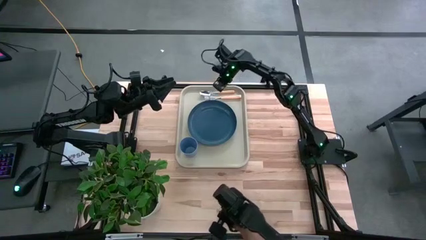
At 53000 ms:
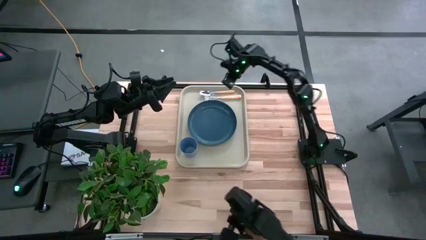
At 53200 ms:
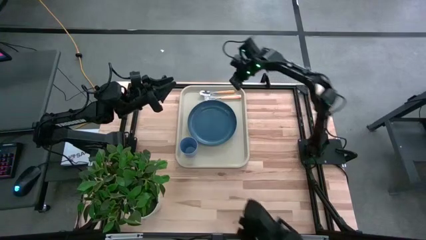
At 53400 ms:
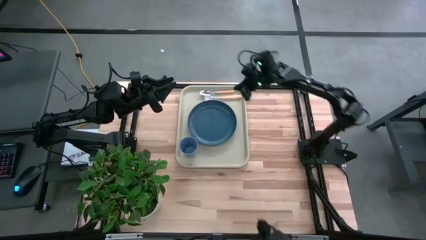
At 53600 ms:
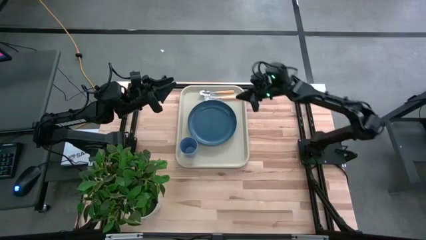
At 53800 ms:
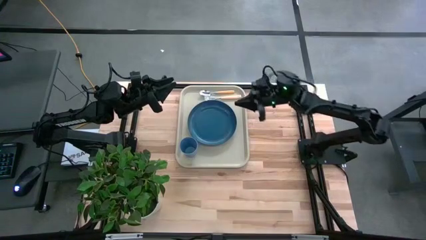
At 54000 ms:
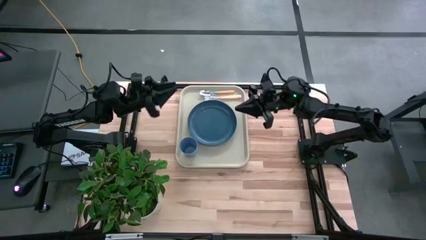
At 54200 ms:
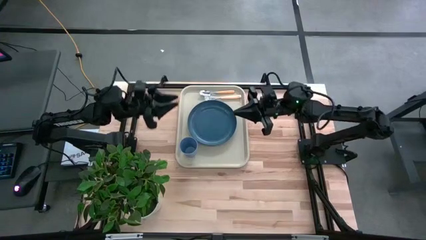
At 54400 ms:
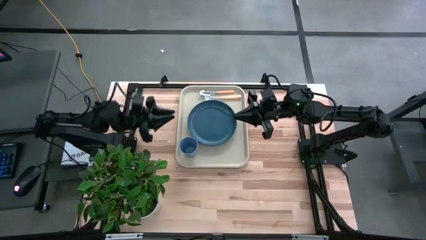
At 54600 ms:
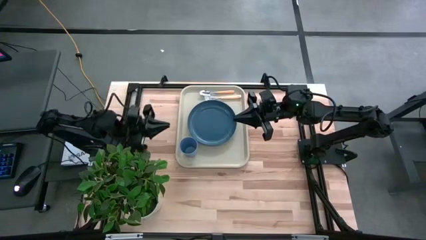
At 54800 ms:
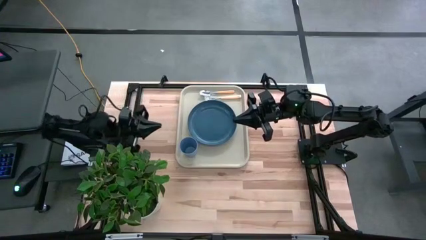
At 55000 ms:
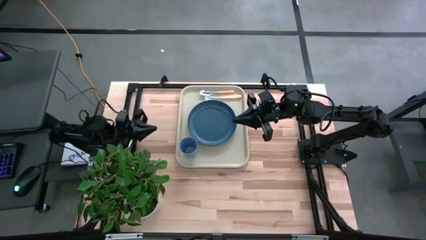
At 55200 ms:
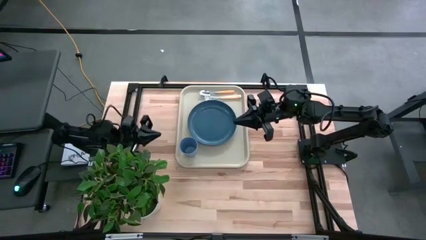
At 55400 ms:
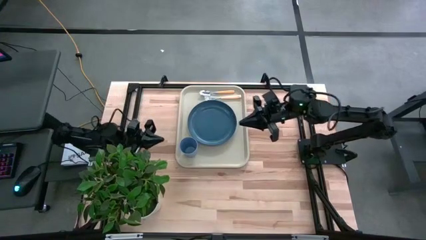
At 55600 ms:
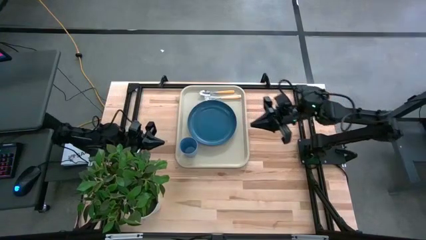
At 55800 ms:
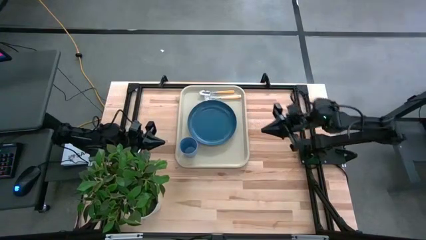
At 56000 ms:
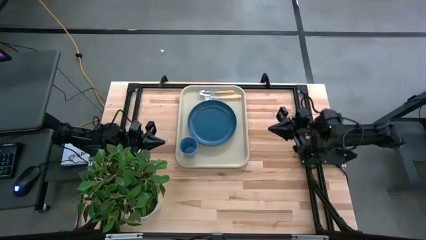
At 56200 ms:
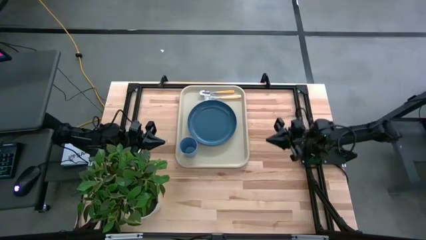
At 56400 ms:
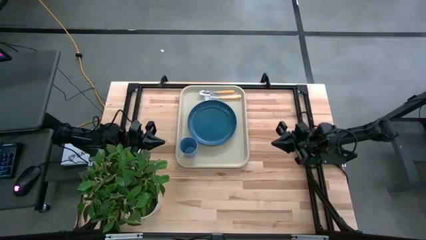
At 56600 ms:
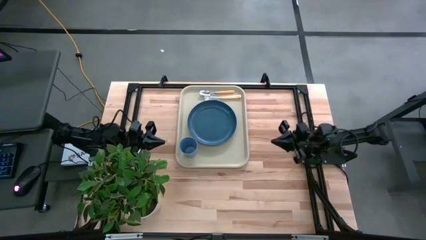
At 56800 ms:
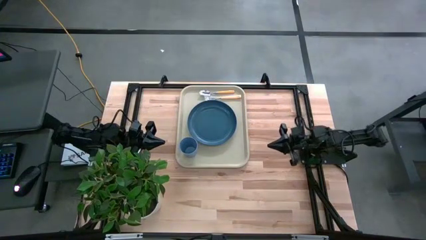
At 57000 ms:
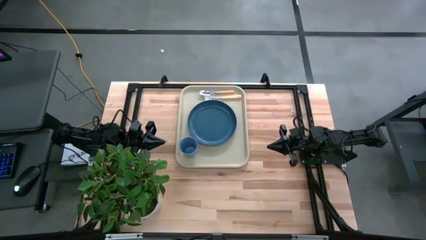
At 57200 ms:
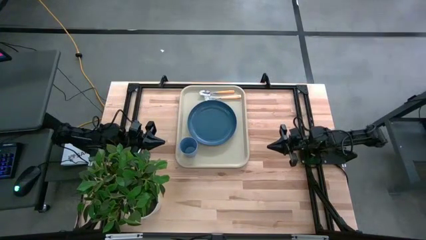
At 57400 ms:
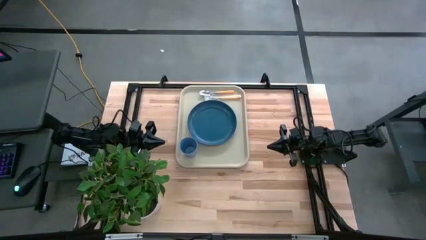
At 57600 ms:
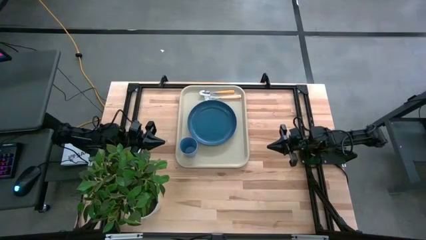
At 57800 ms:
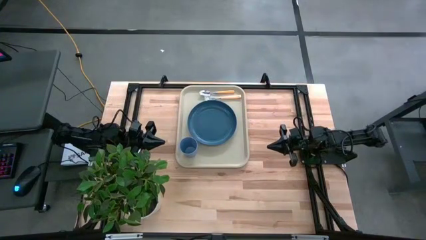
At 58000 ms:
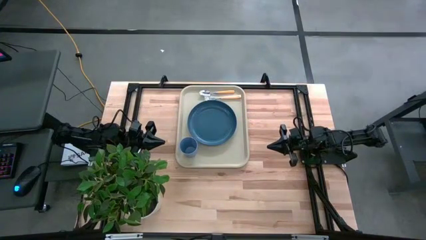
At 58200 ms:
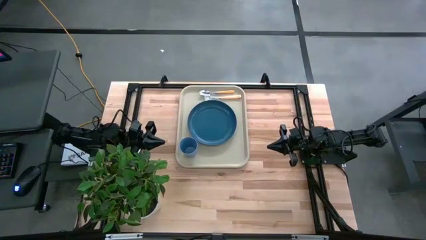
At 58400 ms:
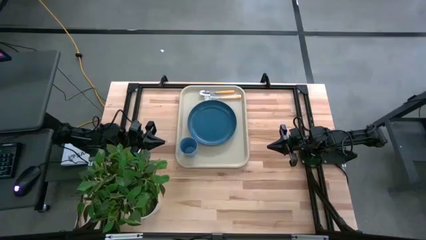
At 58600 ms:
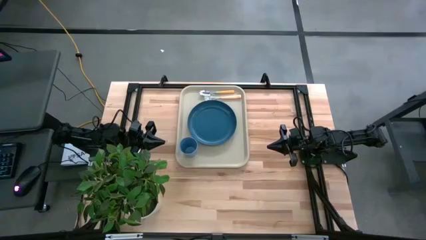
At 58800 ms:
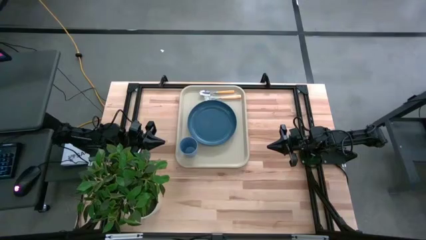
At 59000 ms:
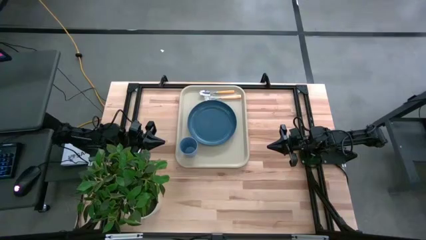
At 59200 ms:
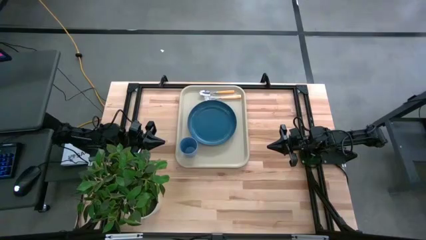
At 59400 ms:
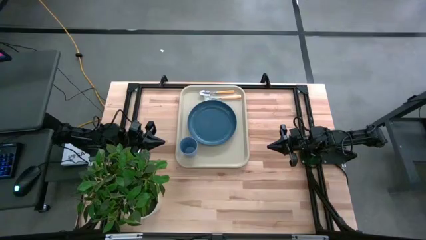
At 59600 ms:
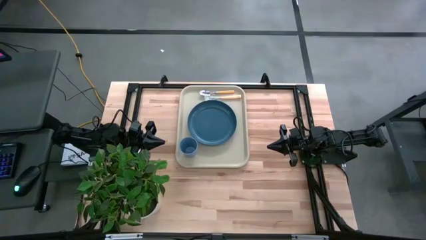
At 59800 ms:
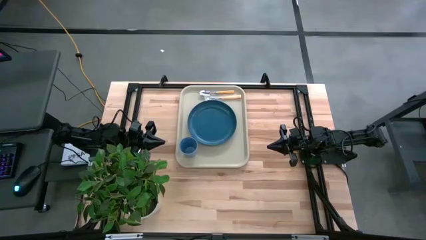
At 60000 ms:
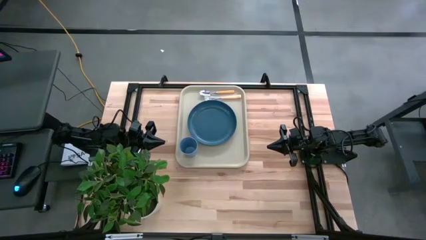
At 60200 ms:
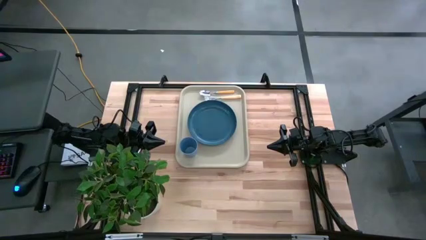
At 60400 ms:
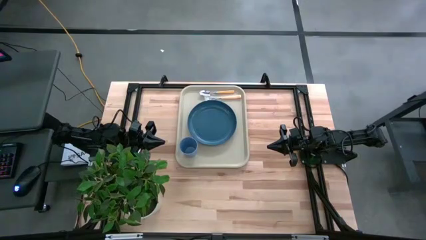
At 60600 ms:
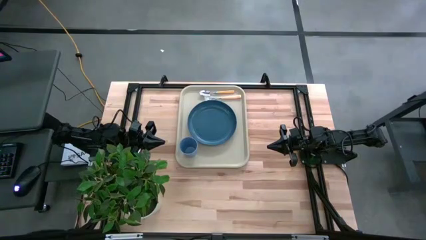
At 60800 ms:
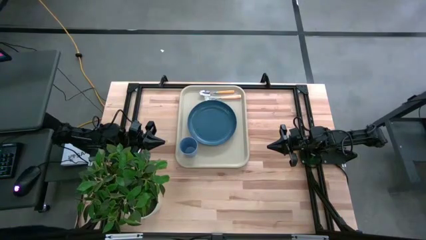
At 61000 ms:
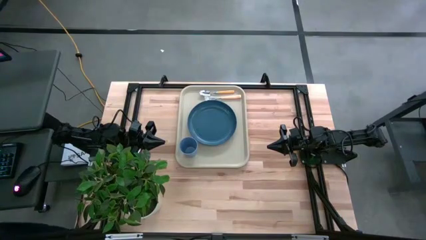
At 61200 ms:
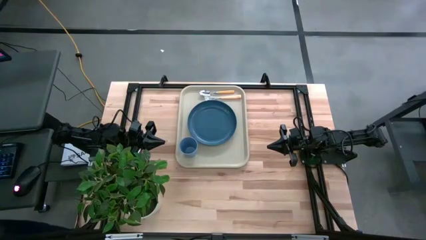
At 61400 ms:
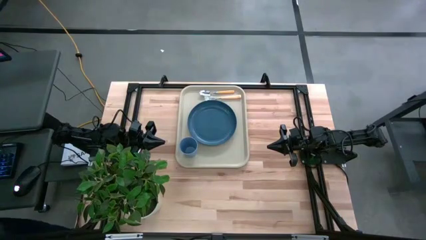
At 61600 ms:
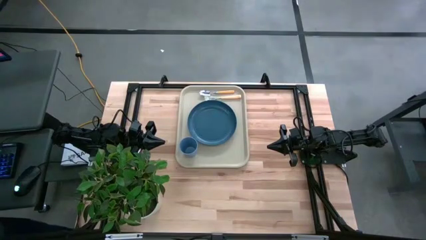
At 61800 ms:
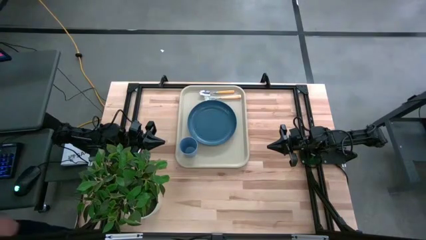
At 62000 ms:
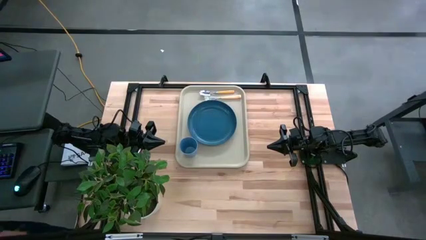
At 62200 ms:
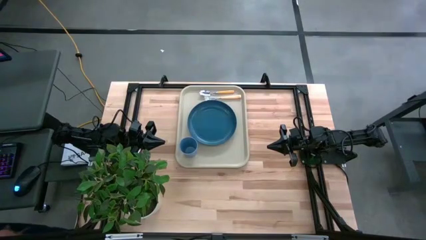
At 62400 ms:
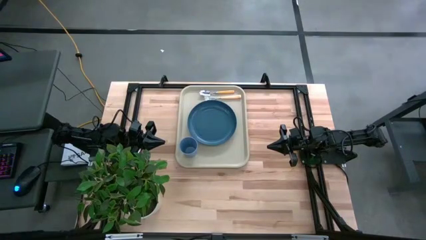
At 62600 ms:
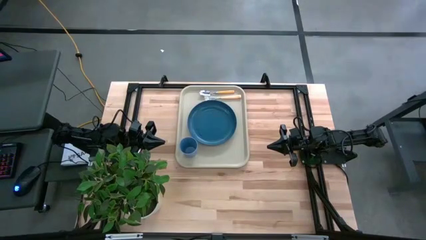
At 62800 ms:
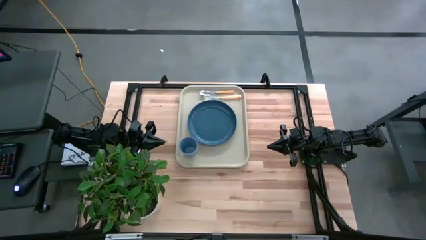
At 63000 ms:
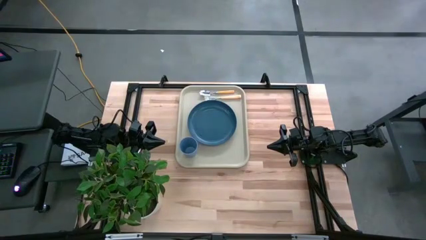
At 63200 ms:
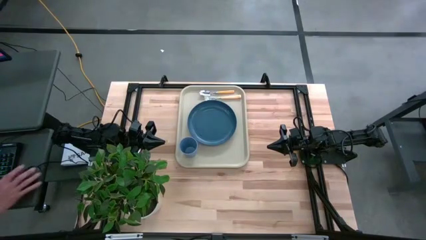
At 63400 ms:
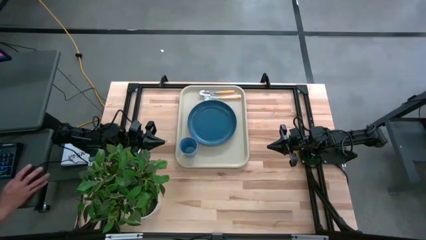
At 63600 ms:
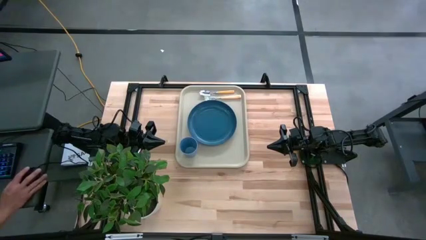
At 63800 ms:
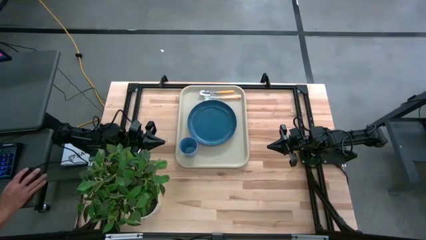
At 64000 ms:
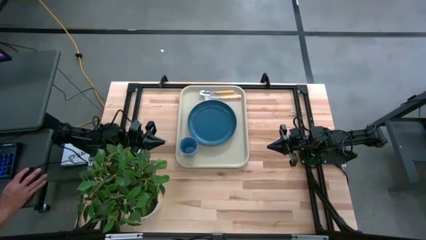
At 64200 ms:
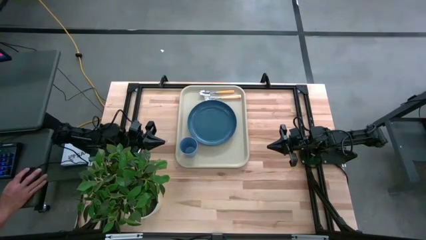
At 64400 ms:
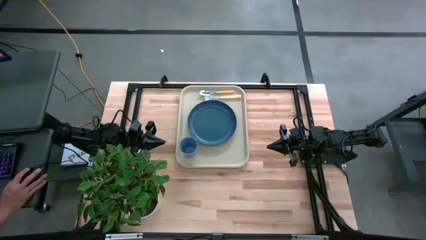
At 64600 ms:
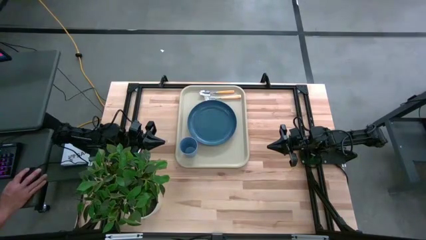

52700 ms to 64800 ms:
Task: Pick and place plate/cup/fork/spoon on tray
Return to Home Position
